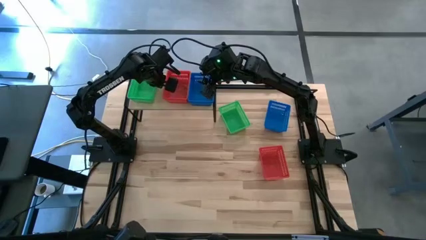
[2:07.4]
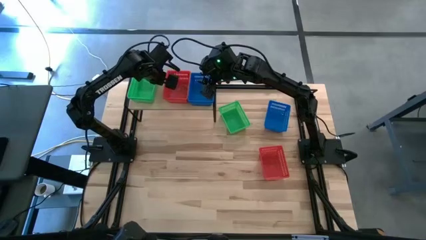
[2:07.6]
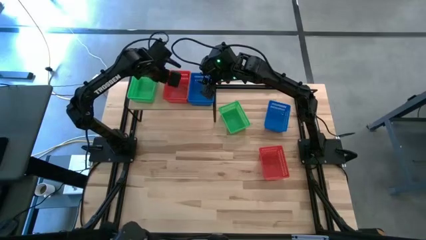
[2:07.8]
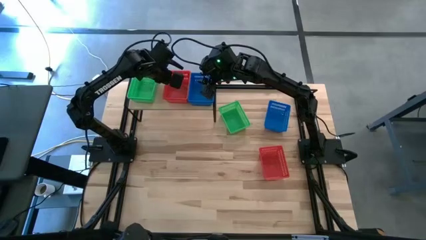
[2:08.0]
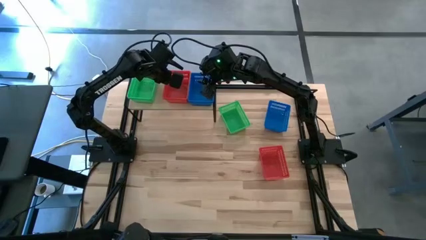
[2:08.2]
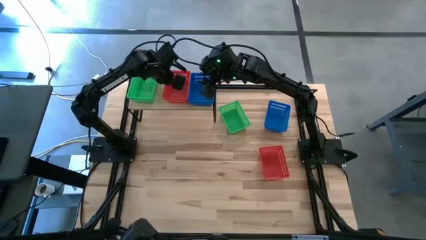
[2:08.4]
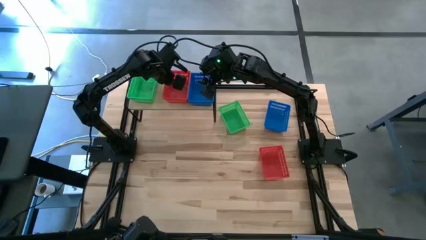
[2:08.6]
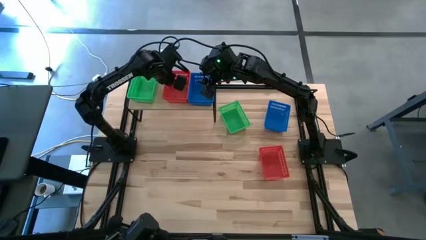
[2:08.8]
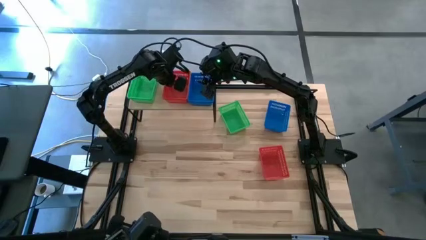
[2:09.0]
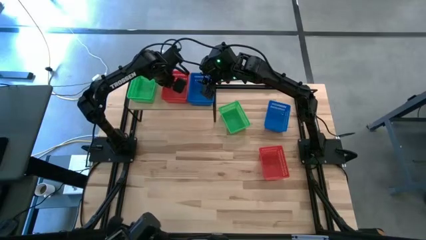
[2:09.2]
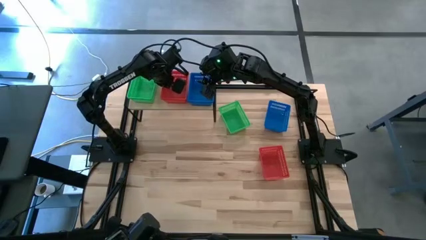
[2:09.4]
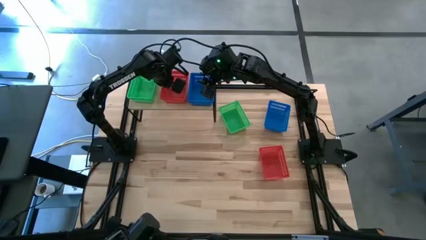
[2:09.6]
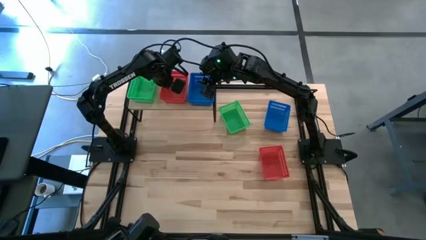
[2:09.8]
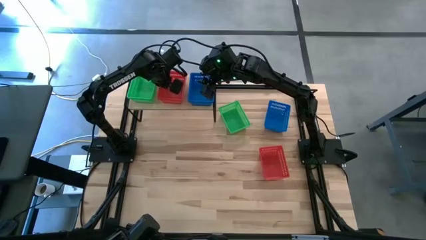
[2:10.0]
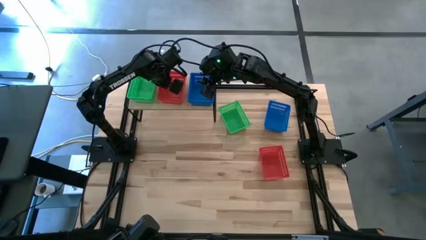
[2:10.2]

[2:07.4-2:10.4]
Task: Stack baskets on shelf by color
Adjust the red basket on the shelf

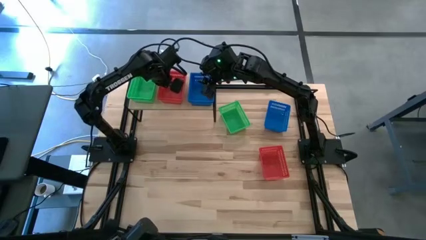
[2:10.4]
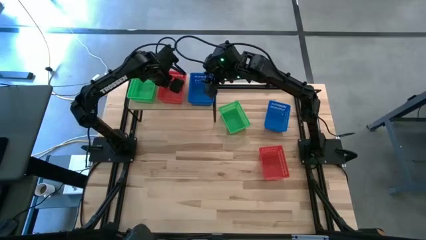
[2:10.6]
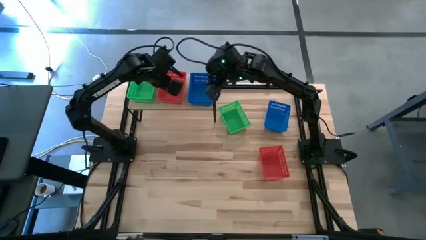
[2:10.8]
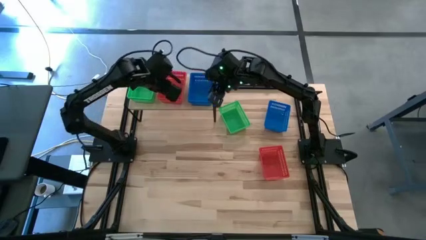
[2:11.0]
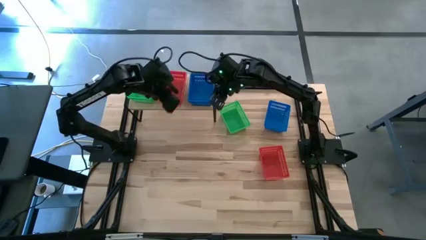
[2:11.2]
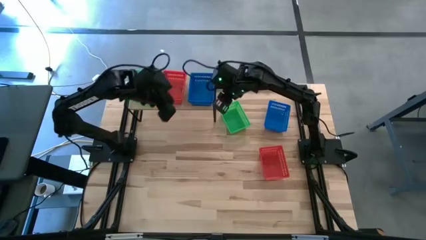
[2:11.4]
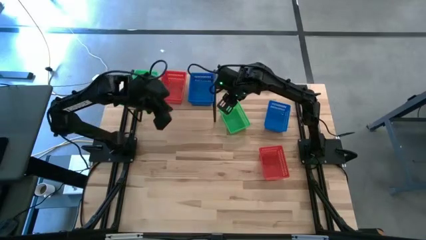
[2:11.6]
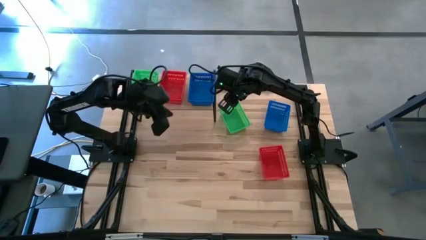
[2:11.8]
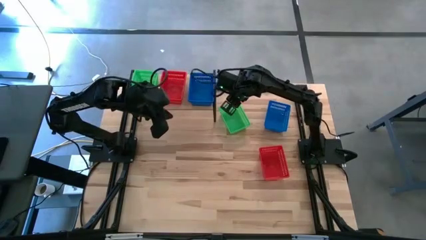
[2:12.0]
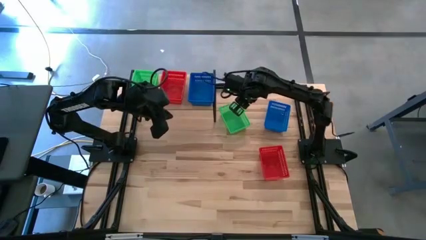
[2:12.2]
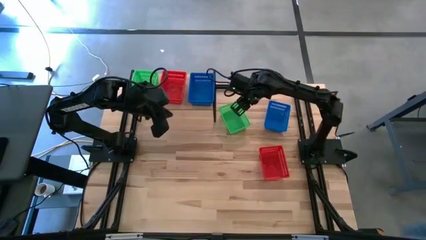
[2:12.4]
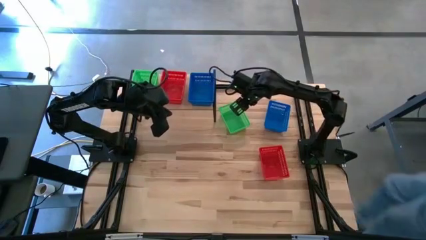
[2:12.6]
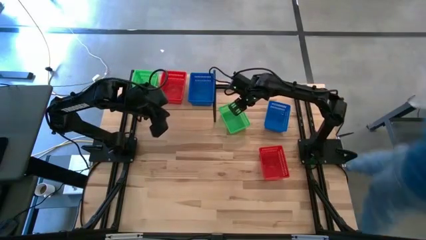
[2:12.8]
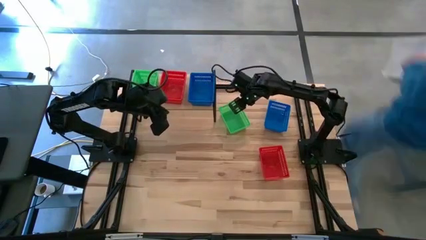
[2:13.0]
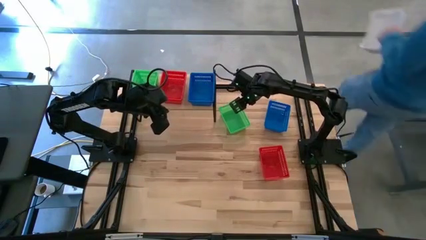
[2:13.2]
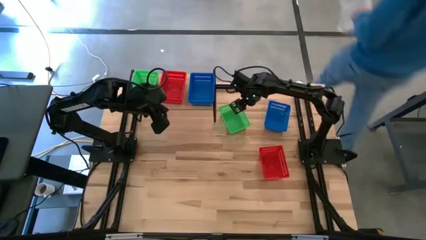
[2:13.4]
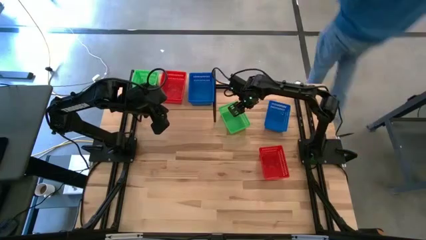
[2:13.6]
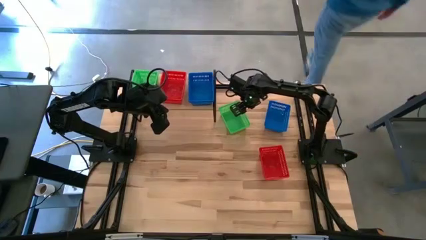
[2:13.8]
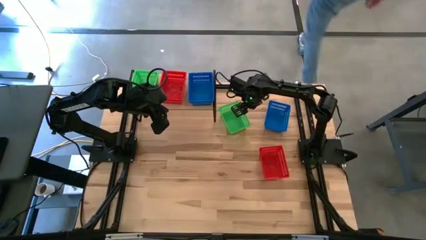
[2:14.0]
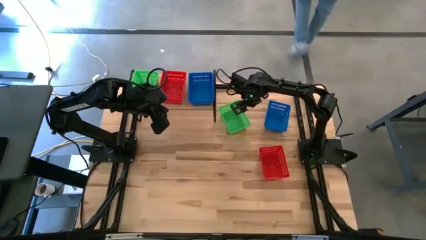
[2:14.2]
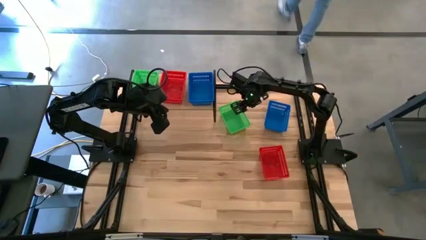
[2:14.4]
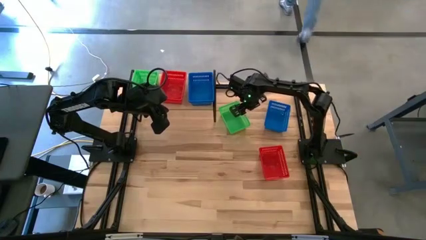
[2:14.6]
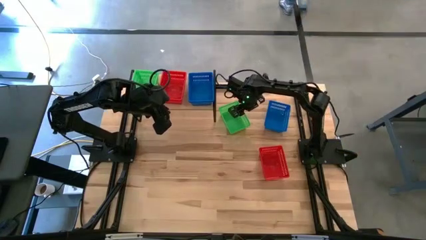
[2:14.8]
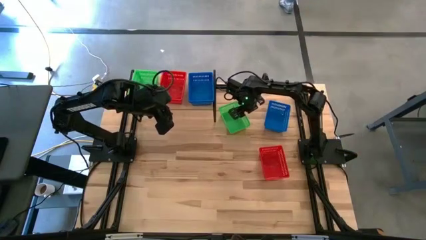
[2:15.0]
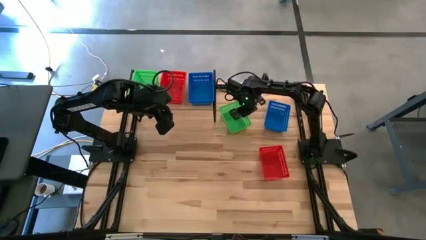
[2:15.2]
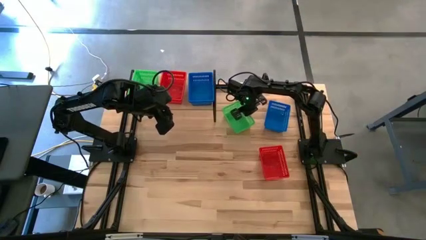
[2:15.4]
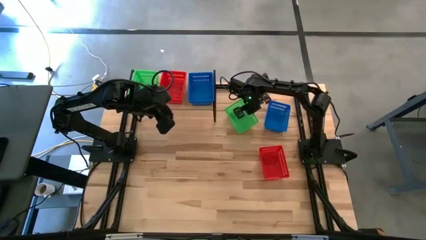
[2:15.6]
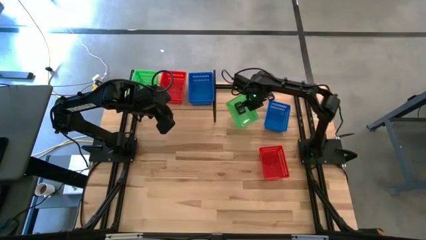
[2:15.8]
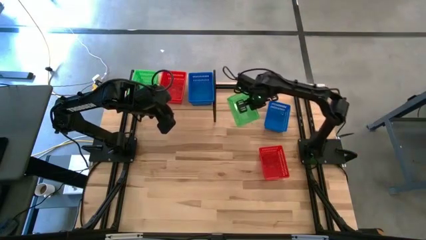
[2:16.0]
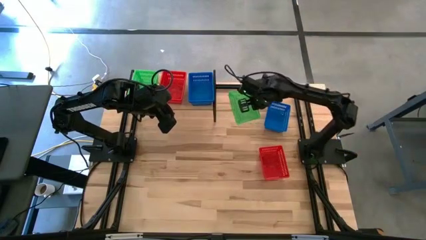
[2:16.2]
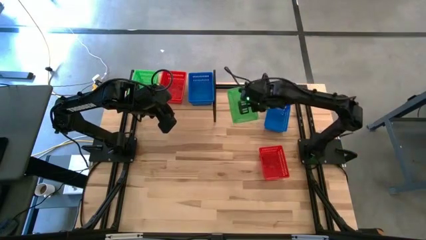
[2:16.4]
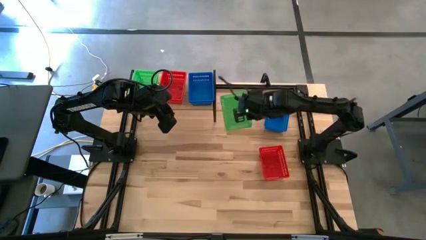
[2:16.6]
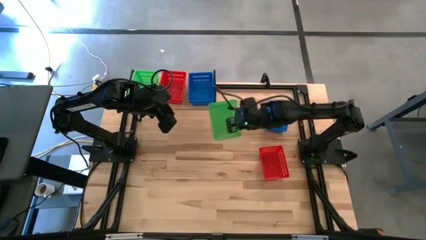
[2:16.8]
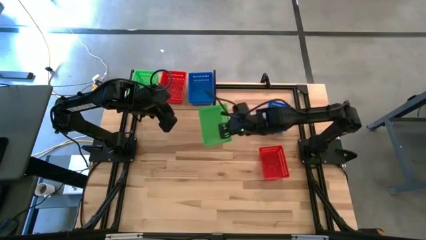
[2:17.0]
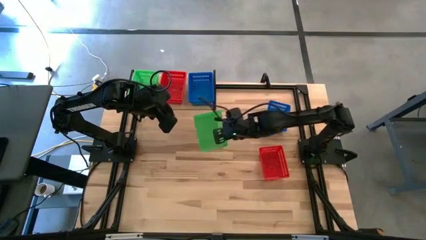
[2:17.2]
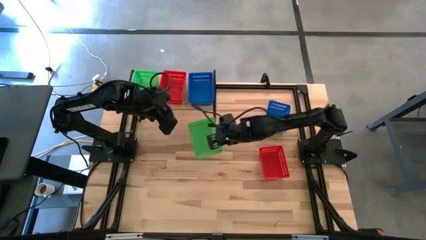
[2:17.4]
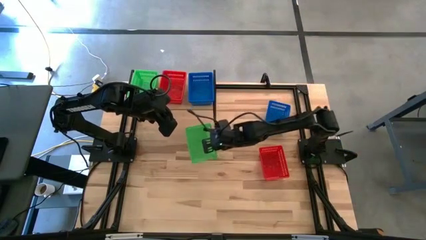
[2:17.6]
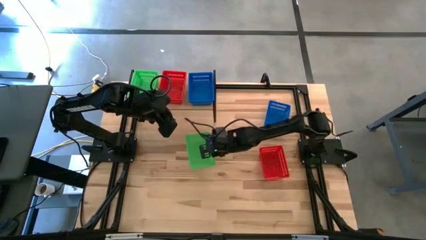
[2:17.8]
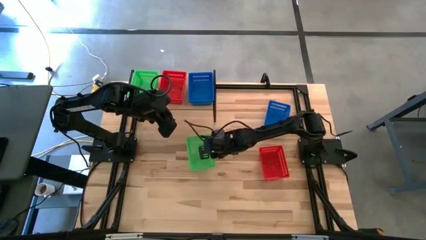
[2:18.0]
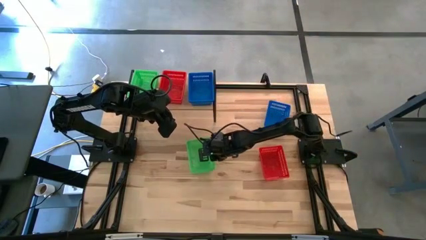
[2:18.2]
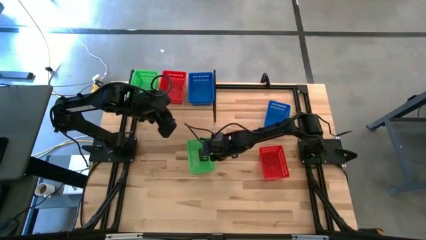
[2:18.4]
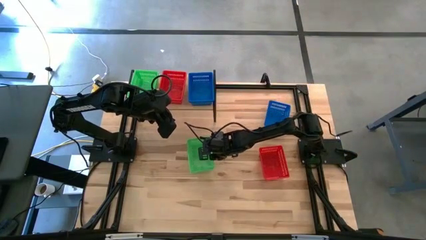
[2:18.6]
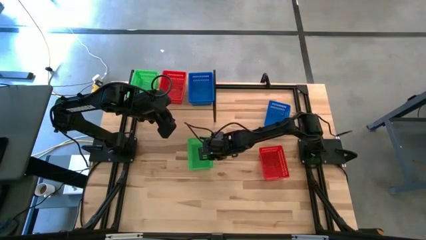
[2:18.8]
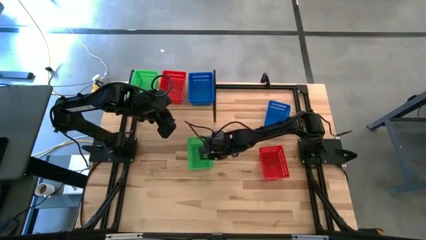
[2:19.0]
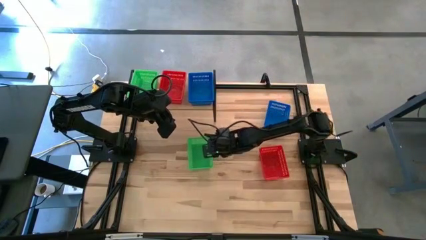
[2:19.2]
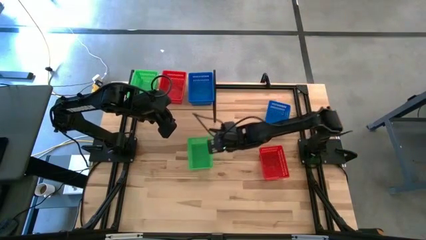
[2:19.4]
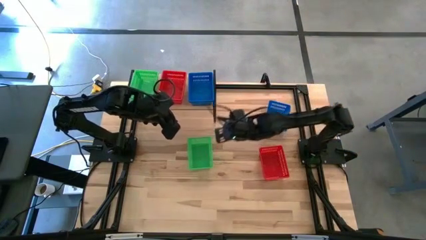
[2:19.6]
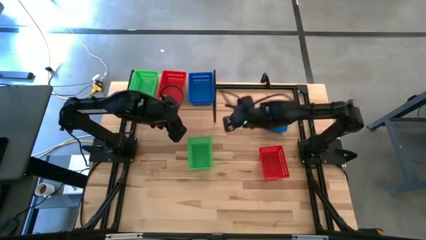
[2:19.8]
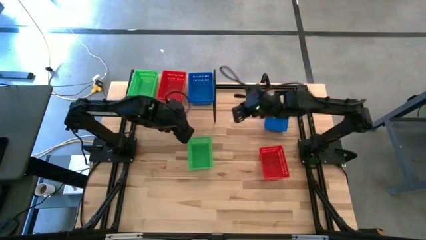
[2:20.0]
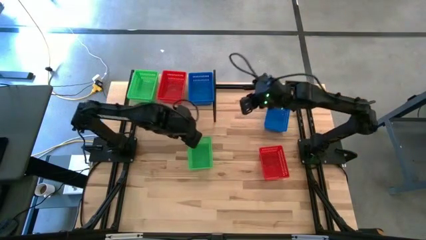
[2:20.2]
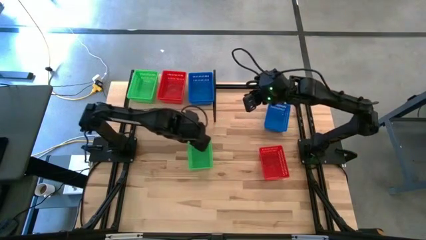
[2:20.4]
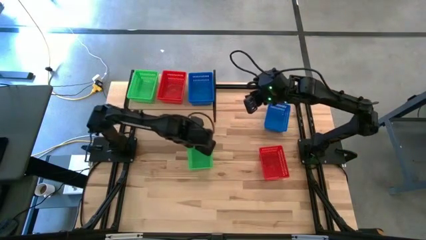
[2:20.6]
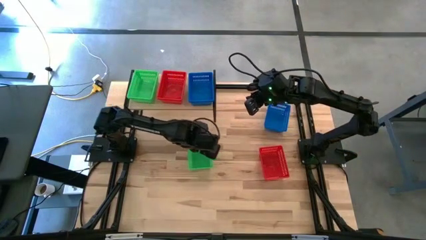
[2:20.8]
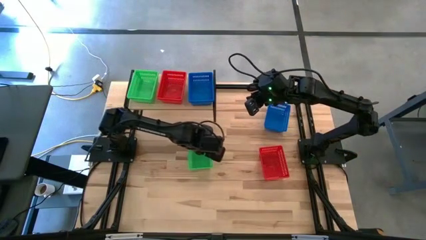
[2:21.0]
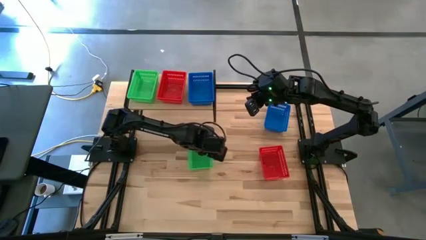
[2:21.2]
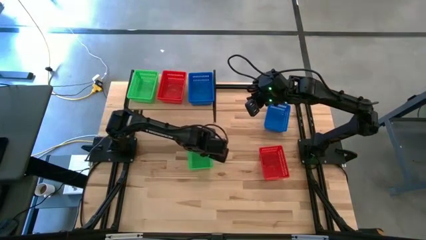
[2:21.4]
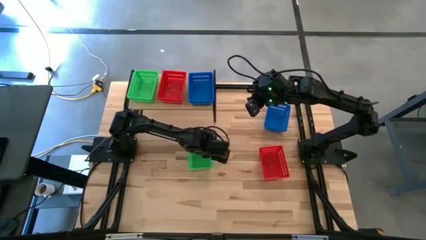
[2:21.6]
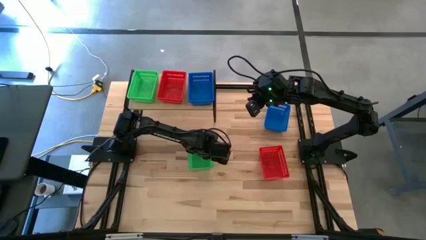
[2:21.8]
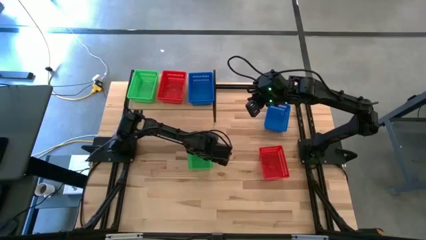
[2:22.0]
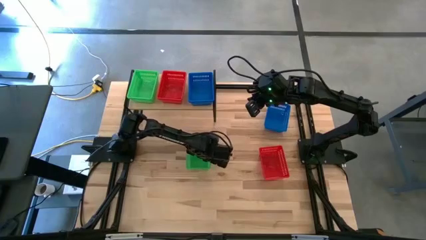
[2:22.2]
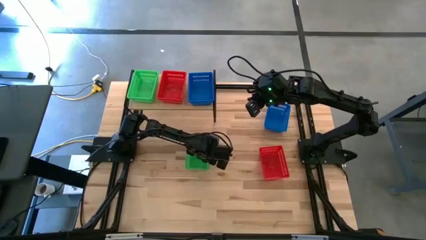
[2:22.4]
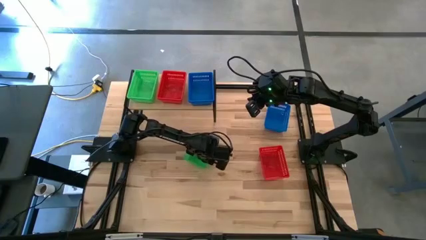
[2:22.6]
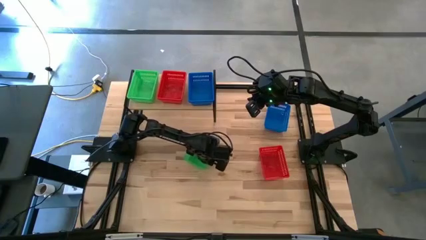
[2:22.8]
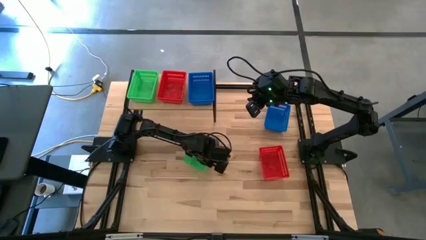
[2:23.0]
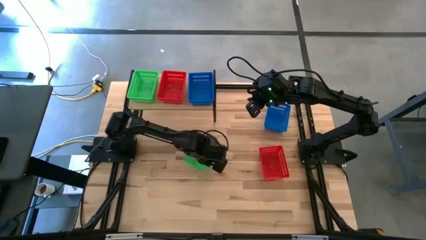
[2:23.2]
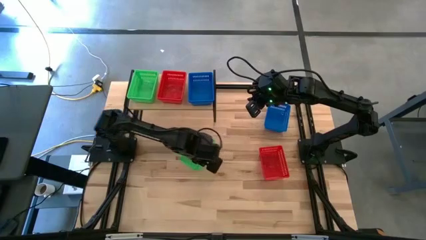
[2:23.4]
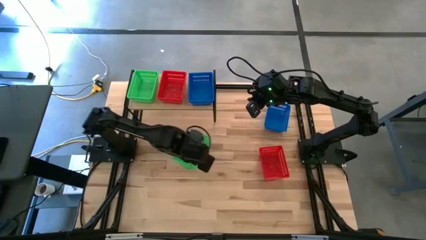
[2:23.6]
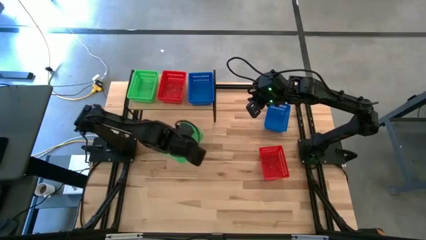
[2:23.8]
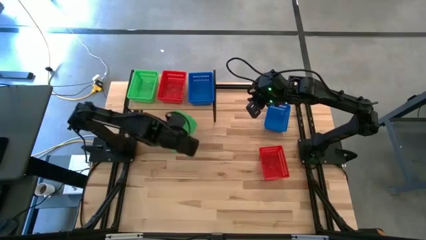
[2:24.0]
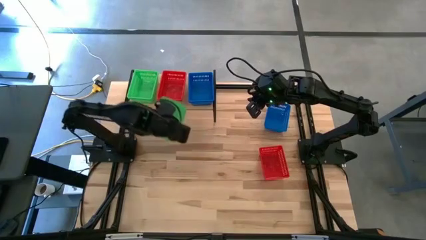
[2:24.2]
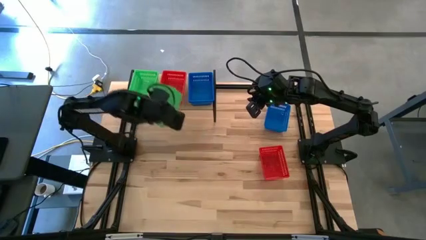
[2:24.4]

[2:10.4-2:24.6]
Stack the green basket on top of the red baskets on the shelf
